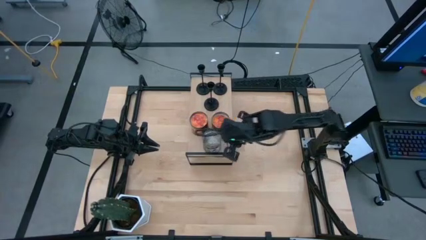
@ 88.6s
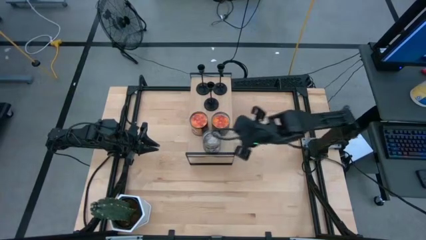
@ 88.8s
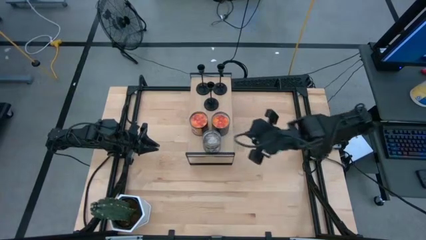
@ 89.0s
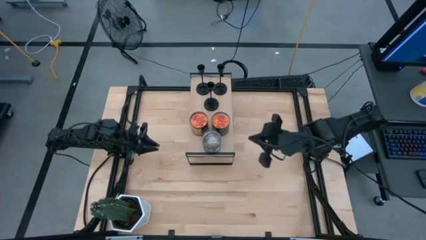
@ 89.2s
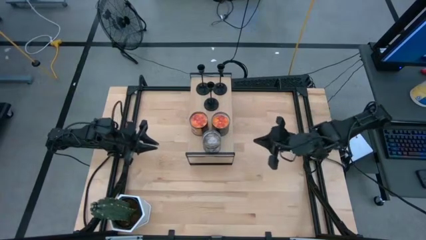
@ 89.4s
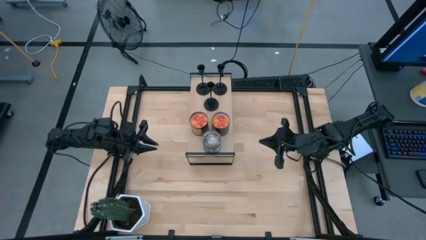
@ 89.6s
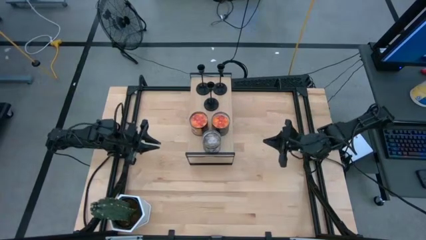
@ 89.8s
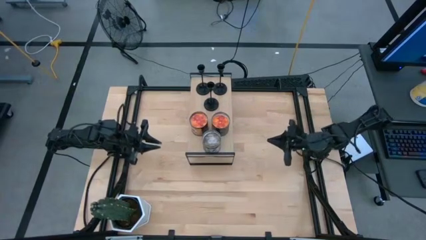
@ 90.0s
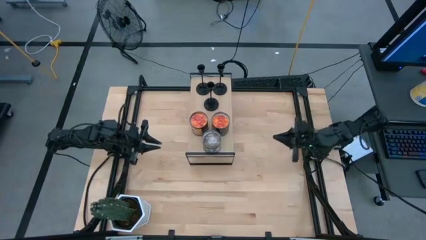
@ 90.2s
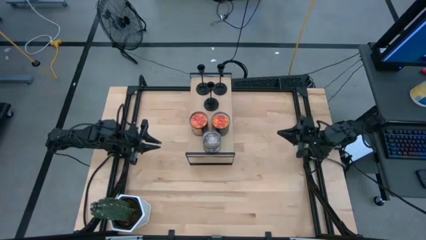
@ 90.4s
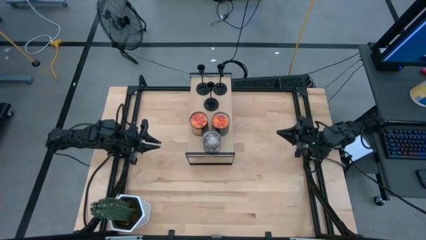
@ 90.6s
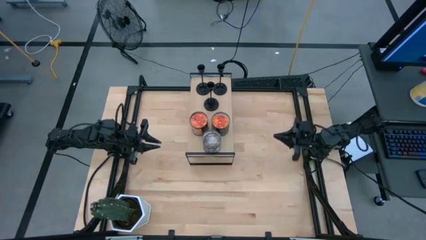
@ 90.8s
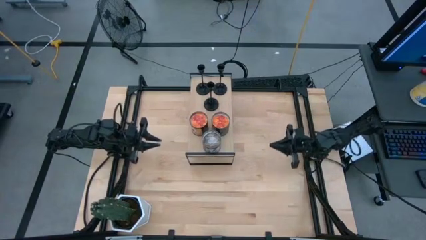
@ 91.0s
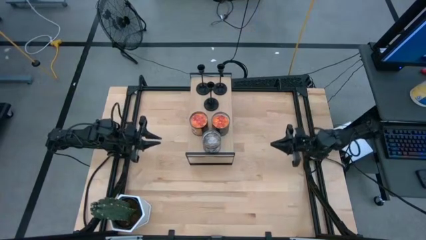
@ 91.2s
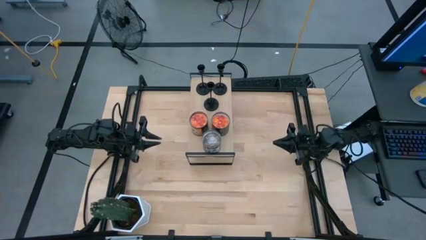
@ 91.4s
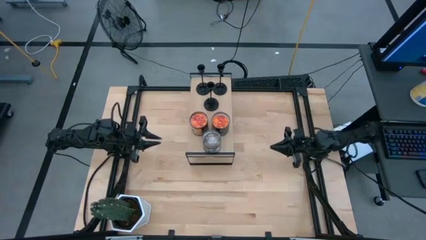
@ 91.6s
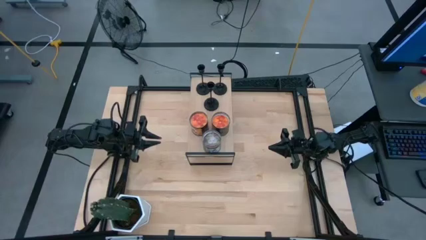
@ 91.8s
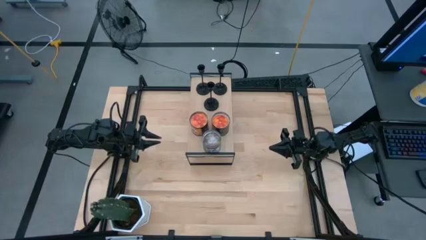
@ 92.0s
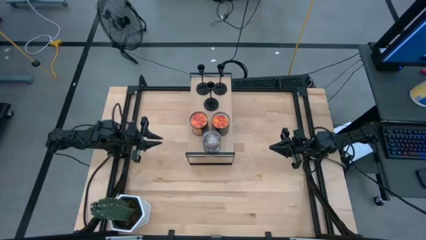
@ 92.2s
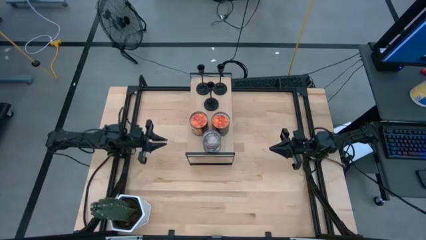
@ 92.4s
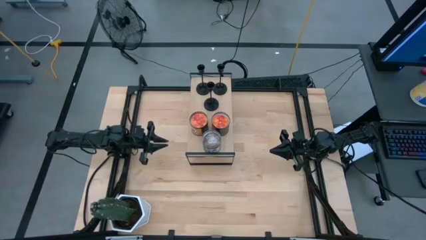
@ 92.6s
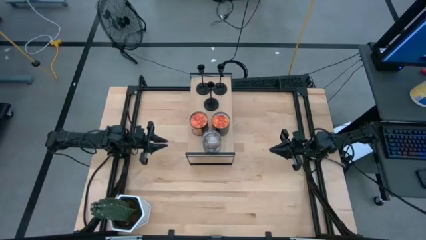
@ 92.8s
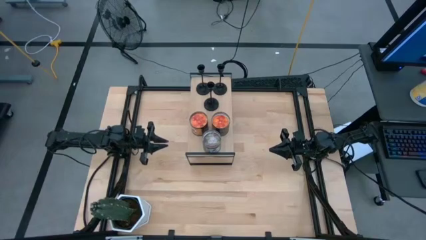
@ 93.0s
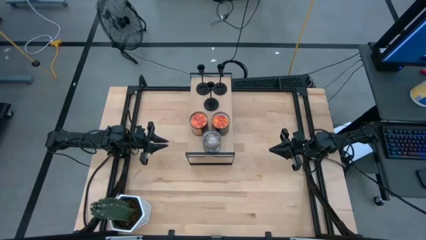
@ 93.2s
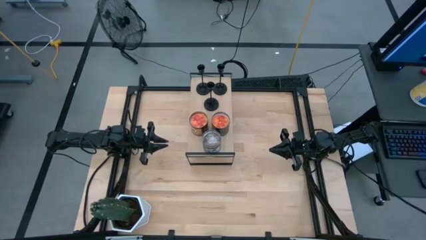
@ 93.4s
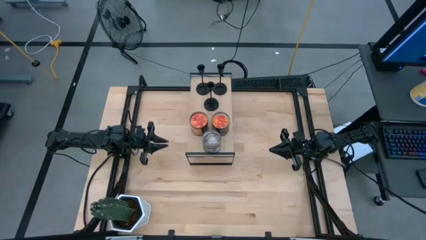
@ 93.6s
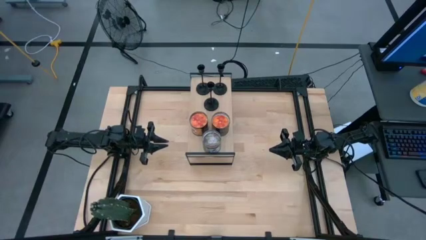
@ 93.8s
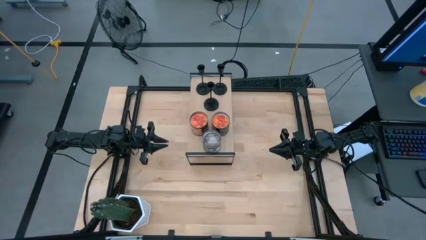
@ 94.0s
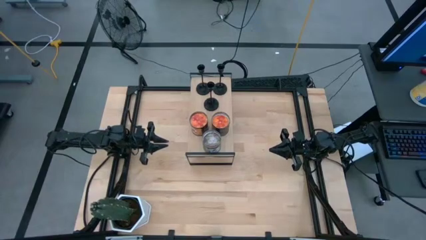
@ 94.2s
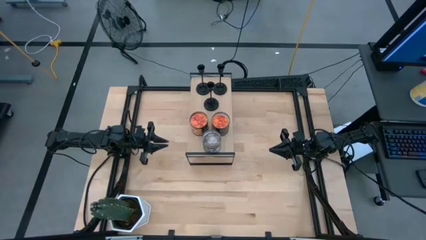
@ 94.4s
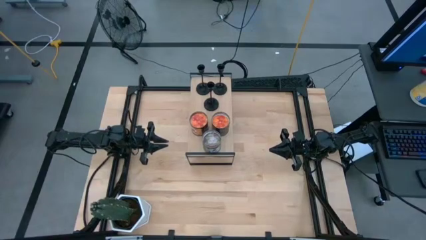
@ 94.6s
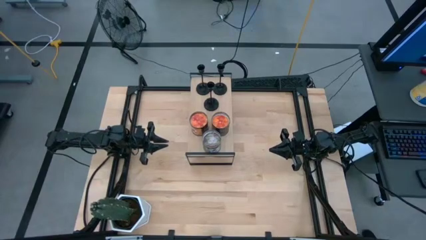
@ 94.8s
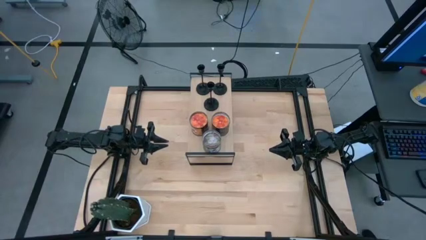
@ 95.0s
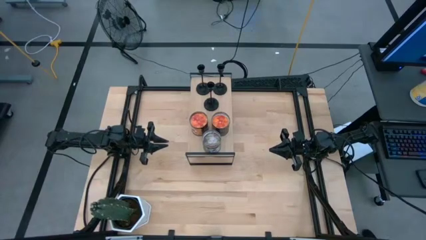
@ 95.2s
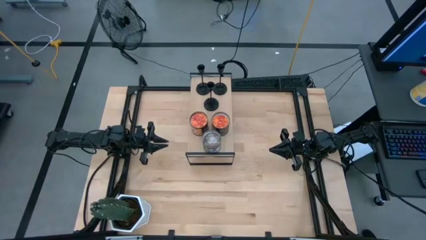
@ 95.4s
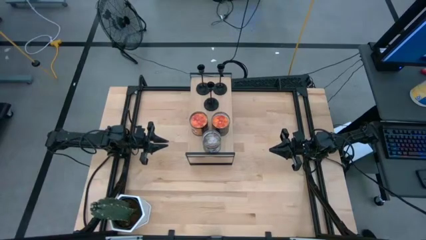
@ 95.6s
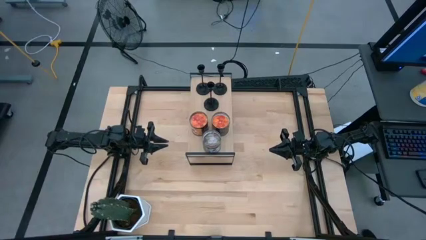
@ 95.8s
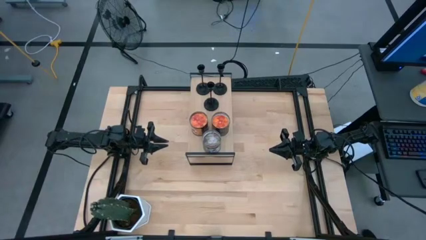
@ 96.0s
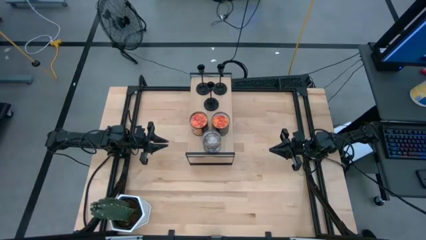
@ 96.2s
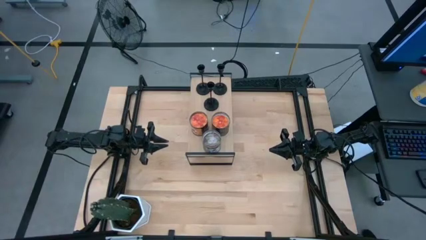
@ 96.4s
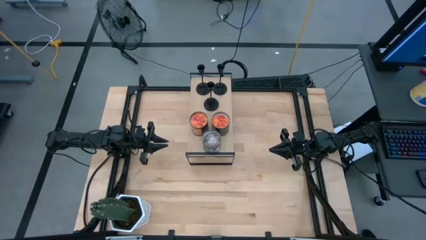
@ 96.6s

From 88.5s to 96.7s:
Task: Pick & Place candle stick holders
Return to Home Position

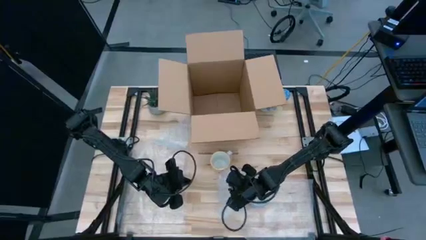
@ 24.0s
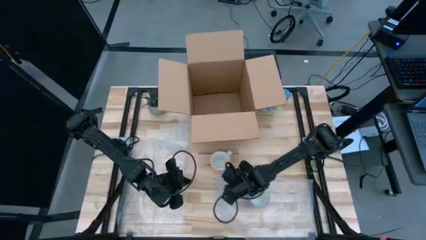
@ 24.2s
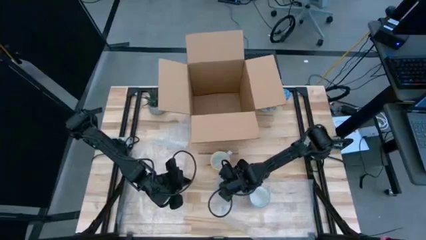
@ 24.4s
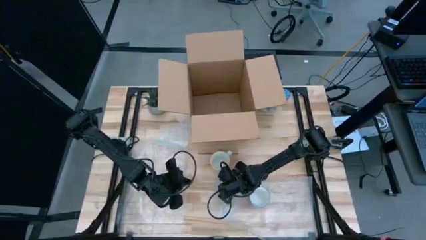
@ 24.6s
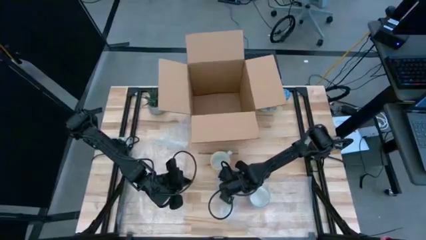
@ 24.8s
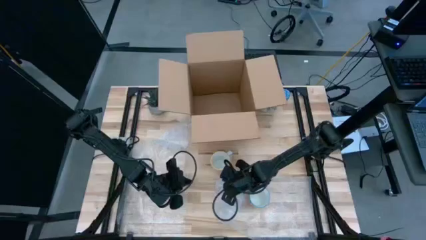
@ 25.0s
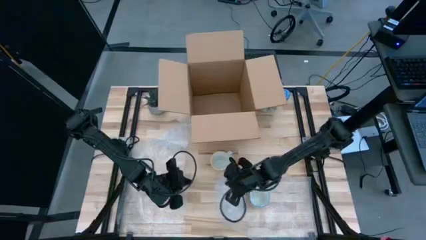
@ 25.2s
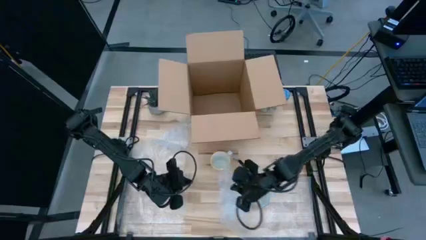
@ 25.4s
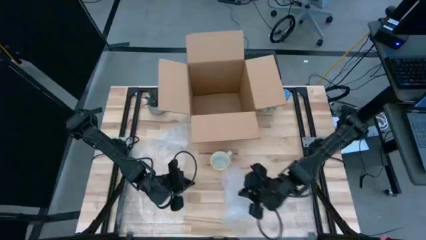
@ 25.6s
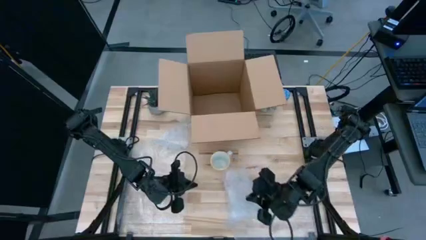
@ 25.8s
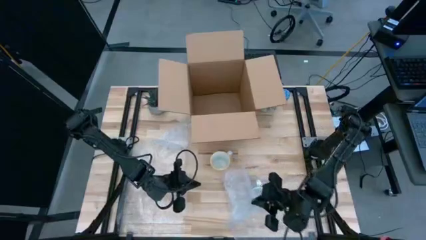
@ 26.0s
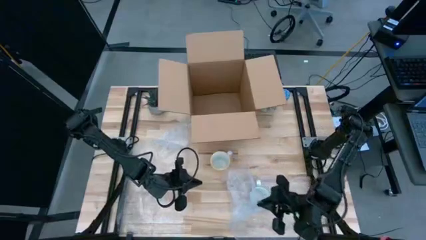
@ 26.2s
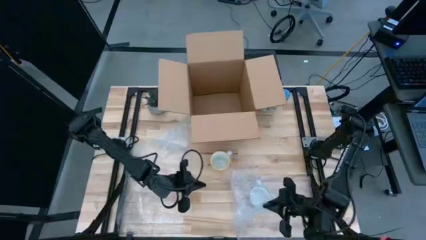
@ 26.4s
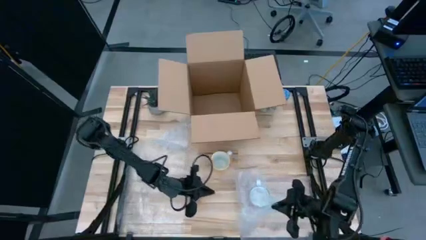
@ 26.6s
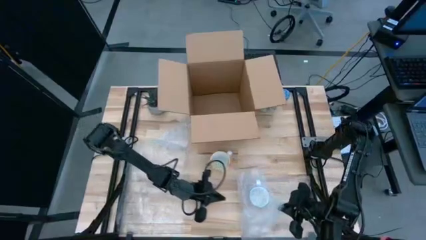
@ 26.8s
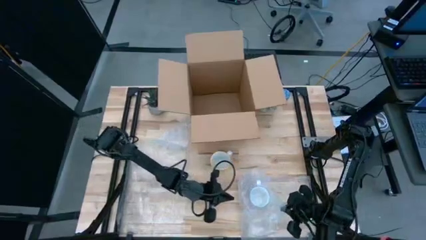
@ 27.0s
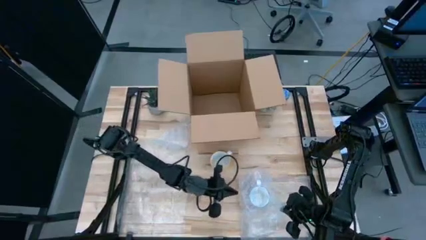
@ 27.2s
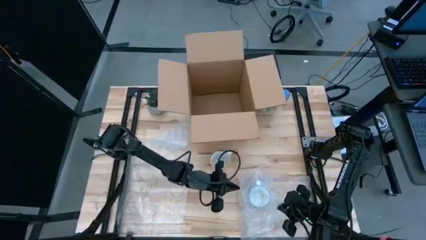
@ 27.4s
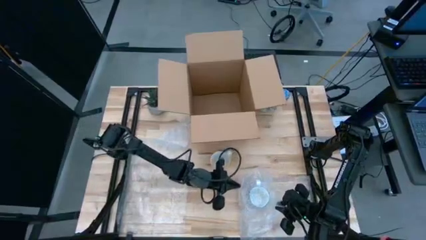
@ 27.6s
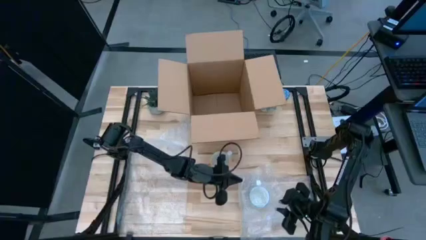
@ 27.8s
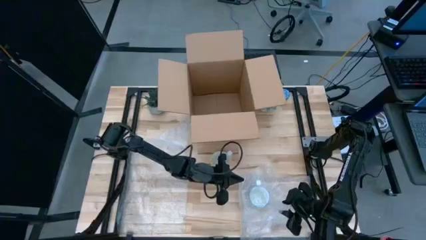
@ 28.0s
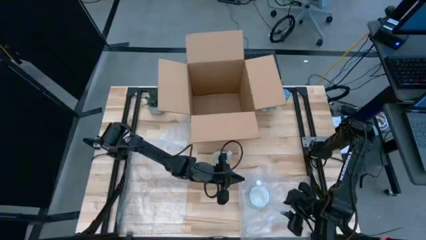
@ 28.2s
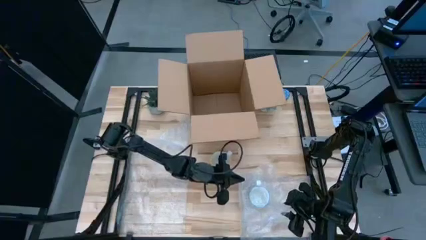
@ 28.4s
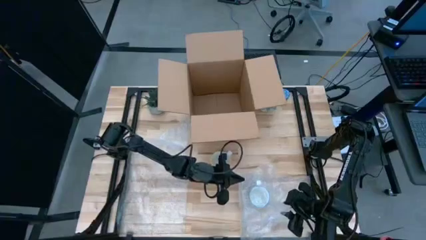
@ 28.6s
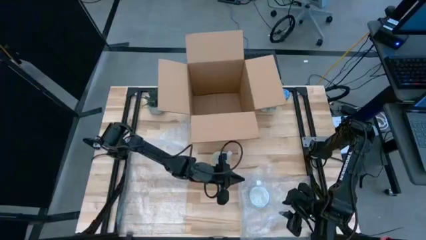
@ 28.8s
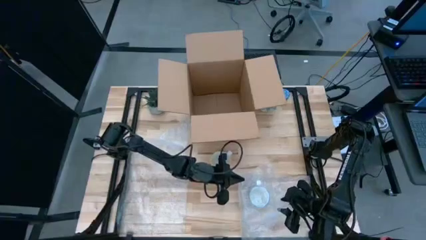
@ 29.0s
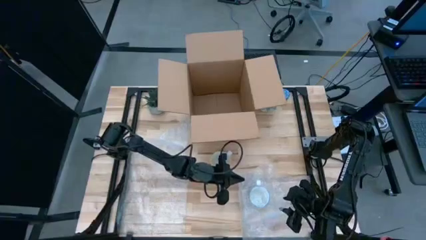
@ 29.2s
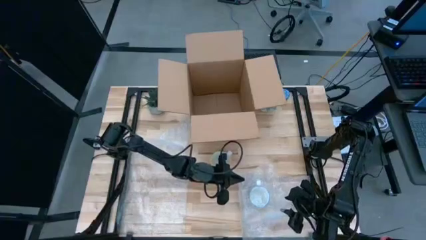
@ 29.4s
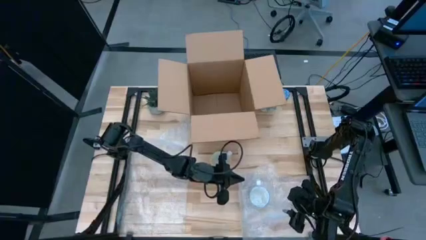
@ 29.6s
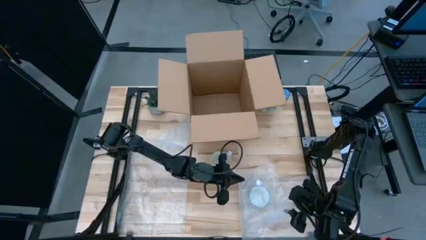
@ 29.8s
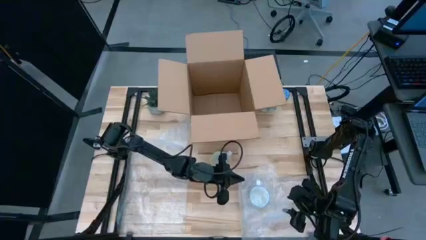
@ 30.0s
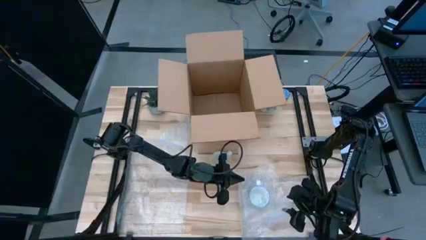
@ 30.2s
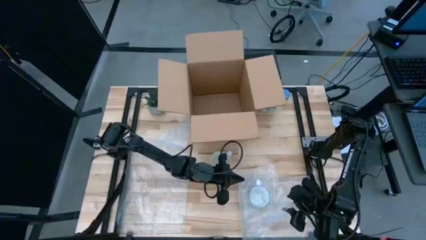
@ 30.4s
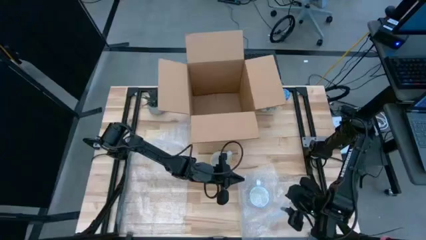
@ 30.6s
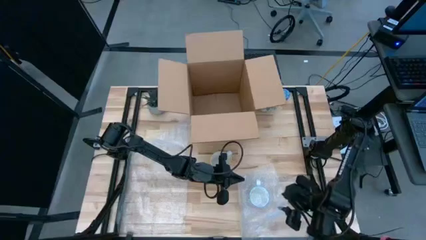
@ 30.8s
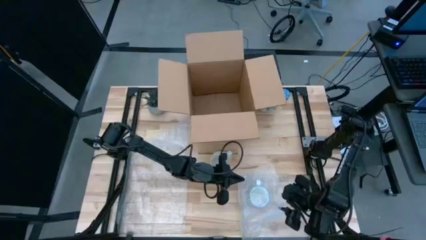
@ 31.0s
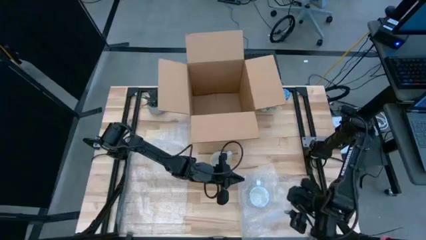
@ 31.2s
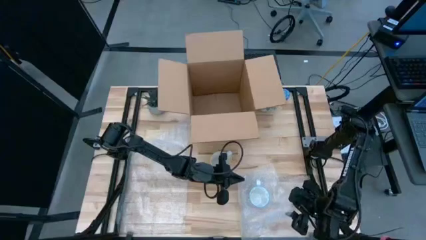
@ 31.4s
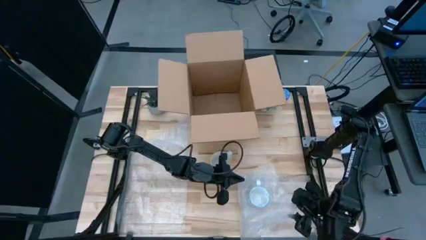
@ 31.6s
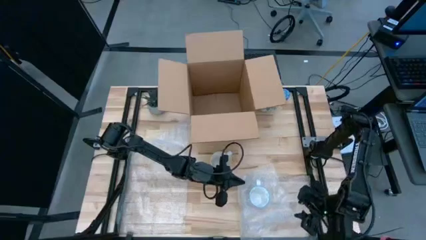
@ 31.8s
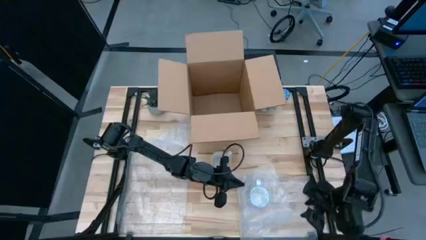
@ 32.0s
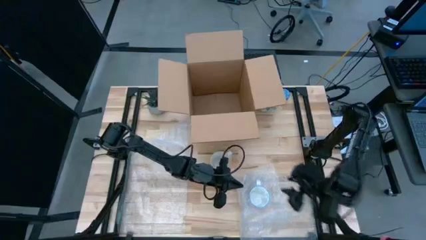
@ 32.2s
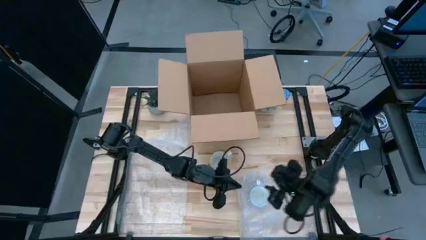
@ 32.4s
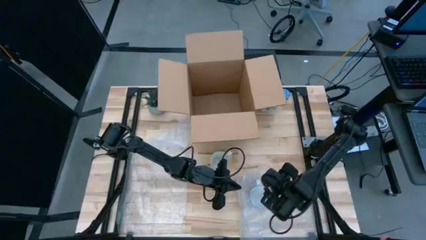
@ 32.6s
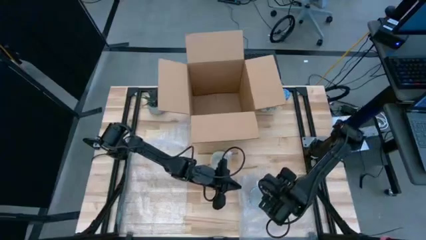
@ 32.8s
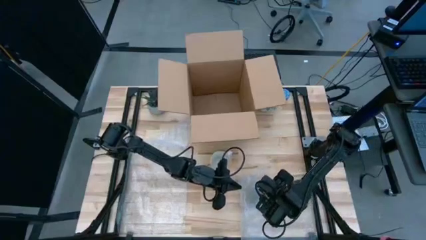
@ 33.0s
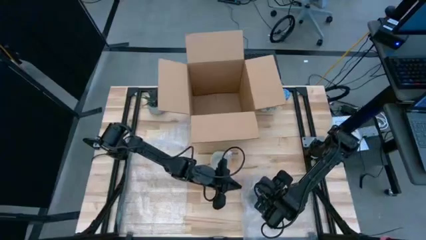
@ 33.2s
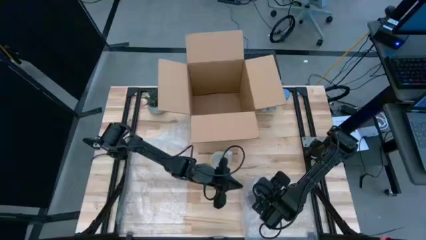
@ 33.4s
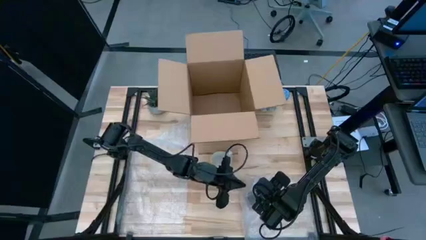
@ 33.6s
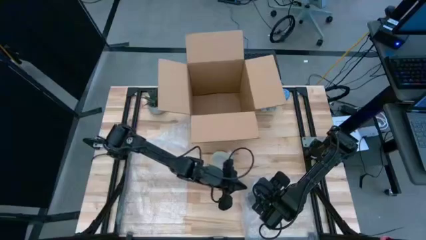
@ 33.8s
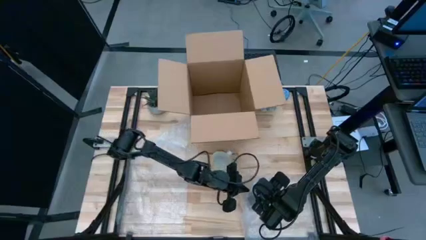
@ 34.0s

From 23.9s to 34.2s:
Task: wrap mug
Wrap the red mug with bubble wrap
